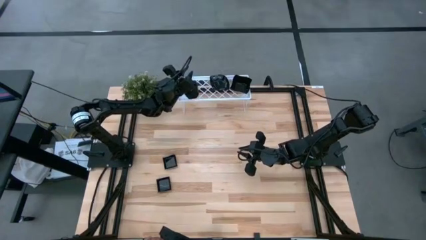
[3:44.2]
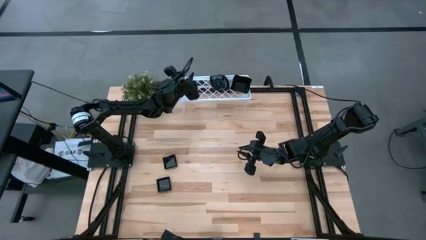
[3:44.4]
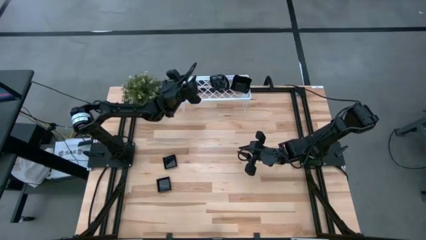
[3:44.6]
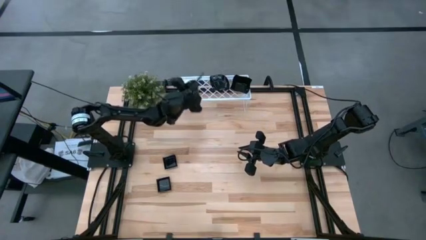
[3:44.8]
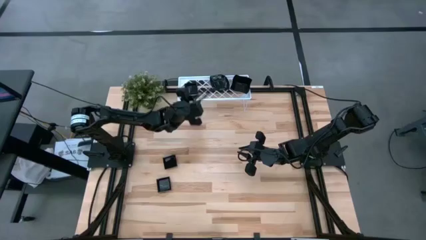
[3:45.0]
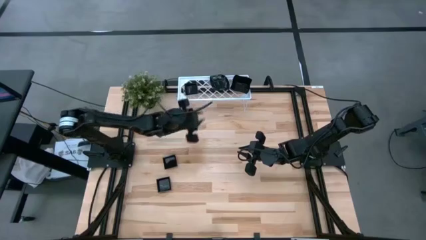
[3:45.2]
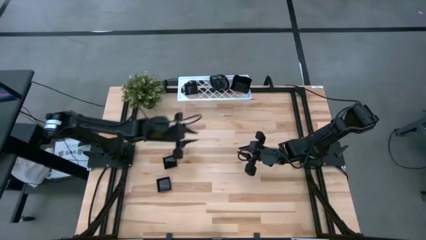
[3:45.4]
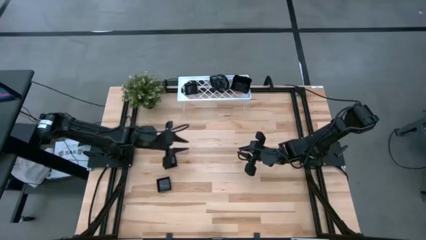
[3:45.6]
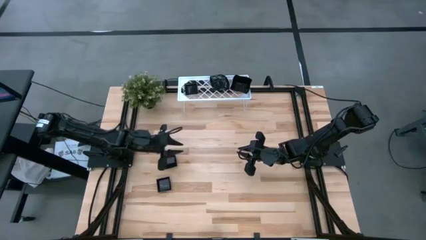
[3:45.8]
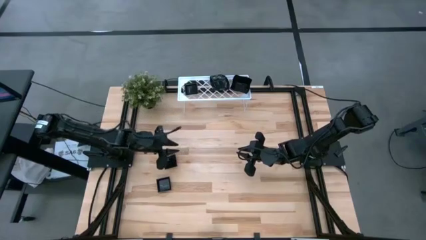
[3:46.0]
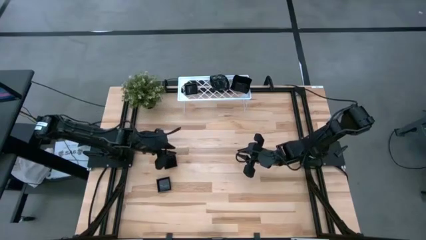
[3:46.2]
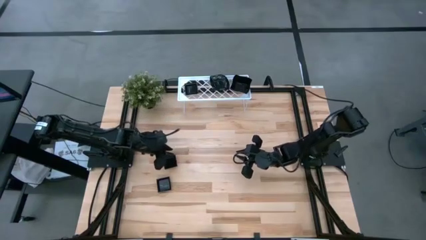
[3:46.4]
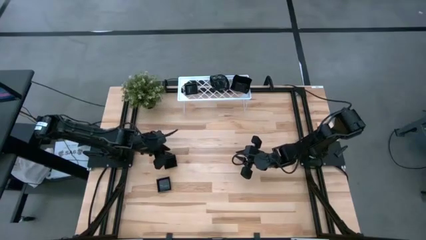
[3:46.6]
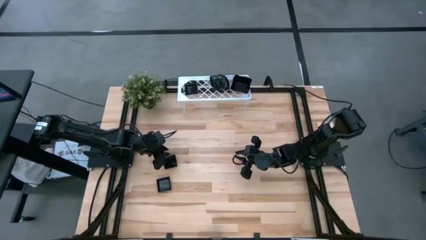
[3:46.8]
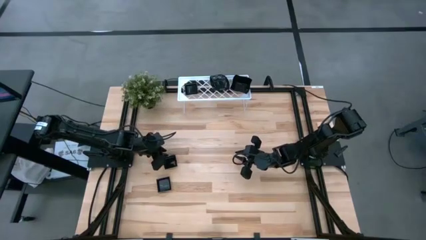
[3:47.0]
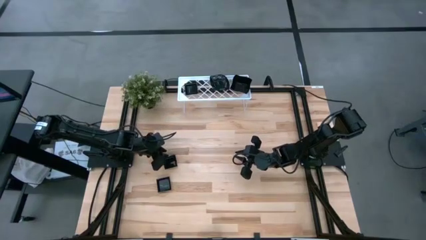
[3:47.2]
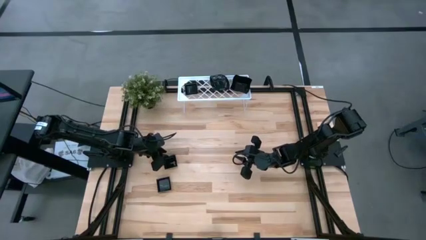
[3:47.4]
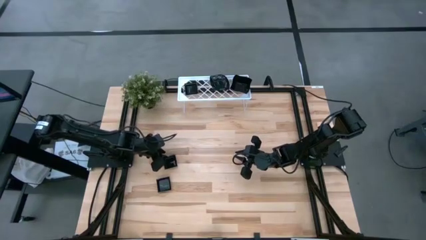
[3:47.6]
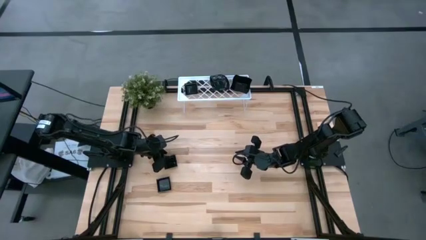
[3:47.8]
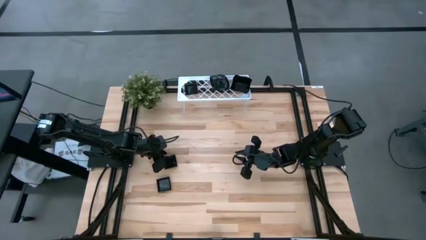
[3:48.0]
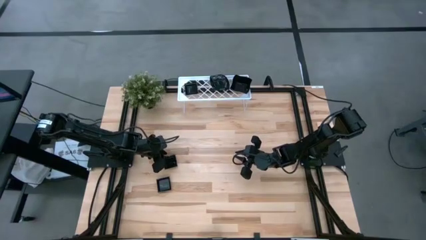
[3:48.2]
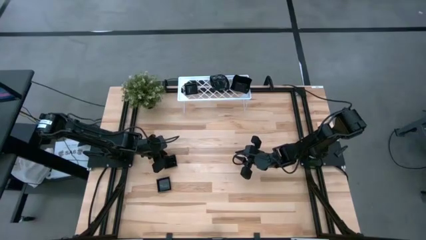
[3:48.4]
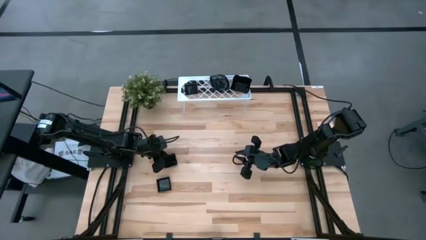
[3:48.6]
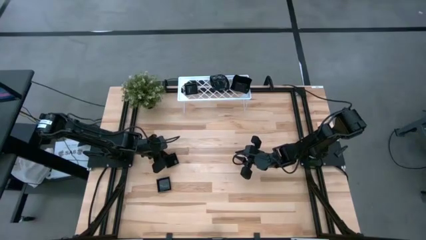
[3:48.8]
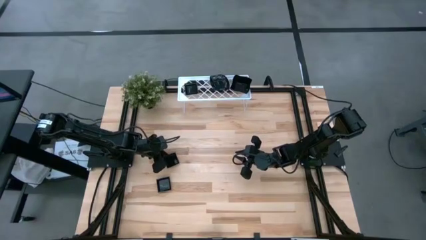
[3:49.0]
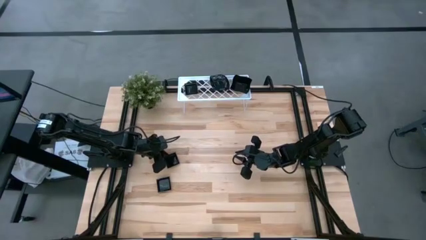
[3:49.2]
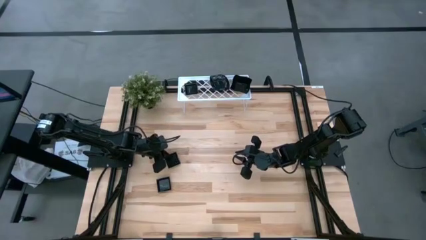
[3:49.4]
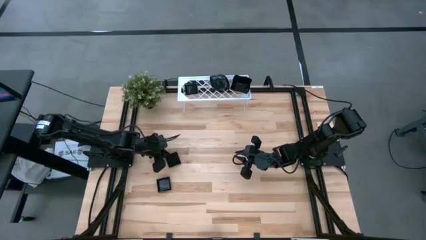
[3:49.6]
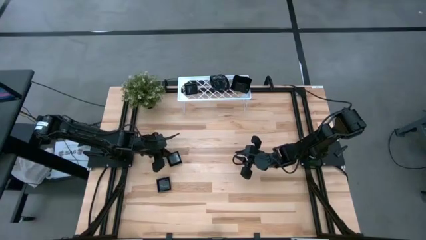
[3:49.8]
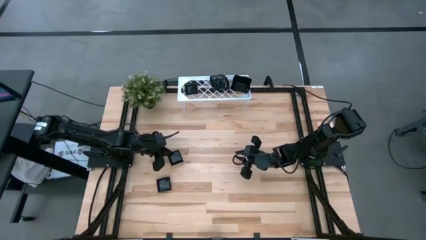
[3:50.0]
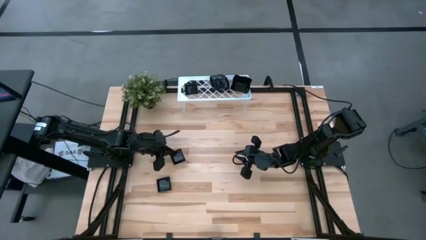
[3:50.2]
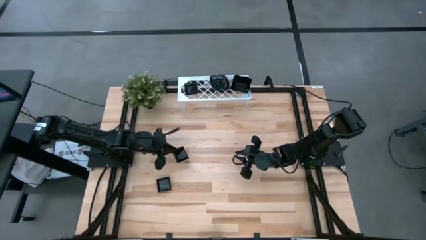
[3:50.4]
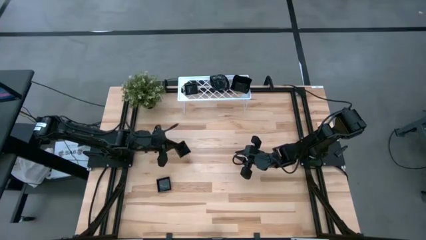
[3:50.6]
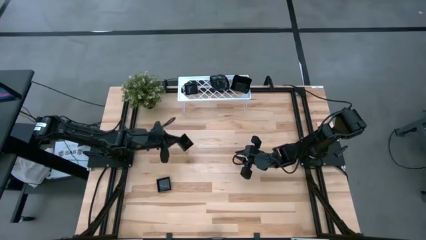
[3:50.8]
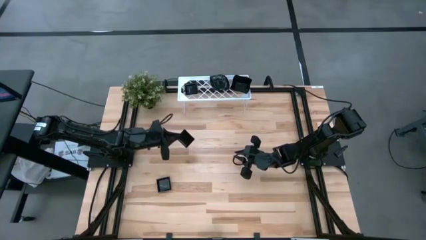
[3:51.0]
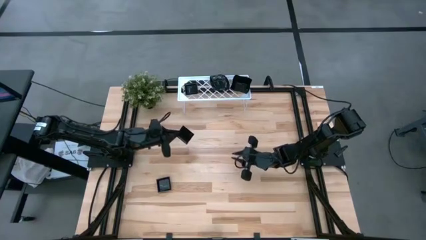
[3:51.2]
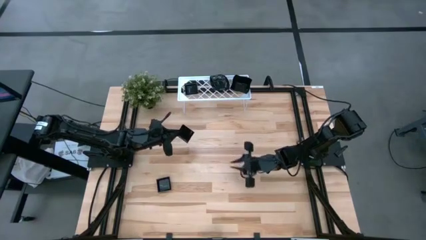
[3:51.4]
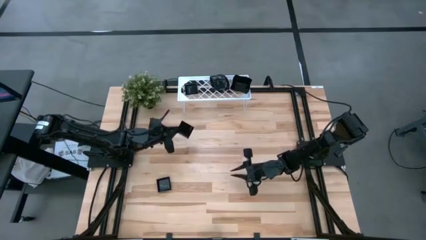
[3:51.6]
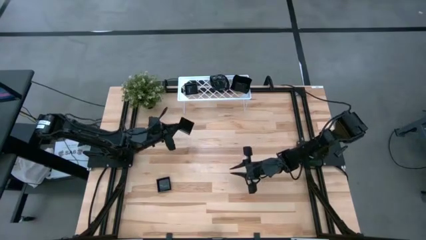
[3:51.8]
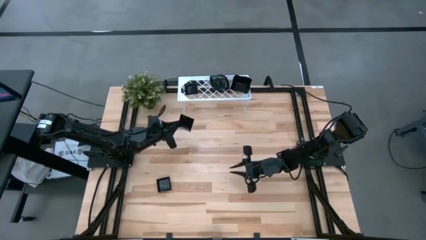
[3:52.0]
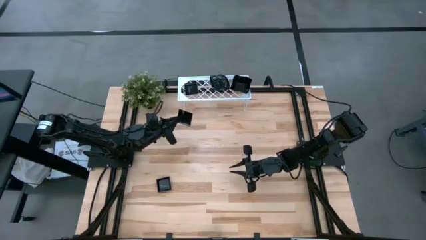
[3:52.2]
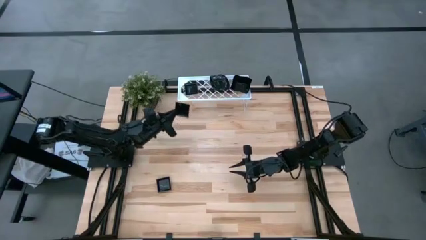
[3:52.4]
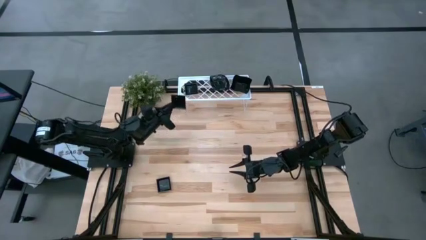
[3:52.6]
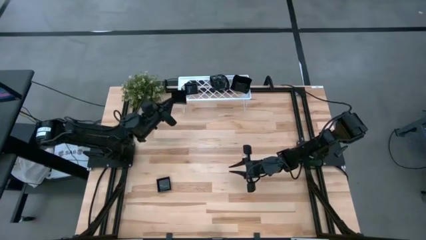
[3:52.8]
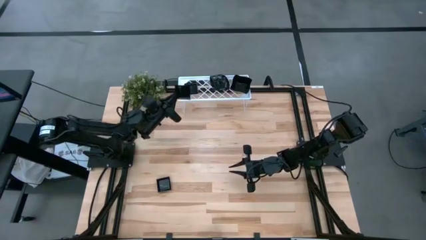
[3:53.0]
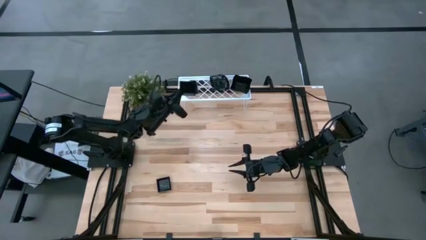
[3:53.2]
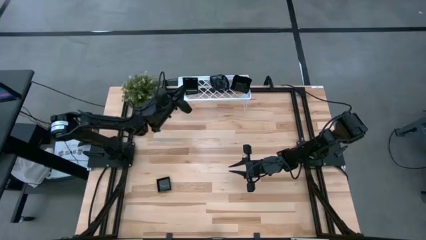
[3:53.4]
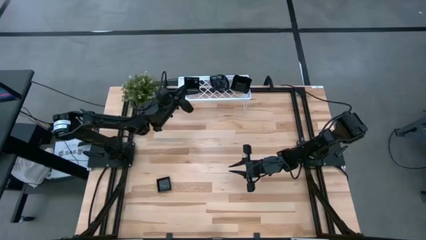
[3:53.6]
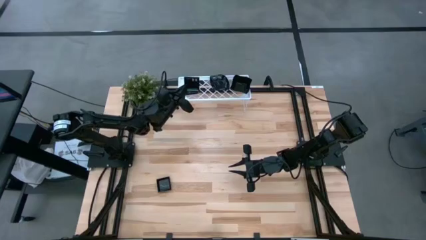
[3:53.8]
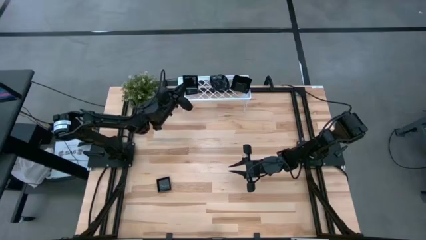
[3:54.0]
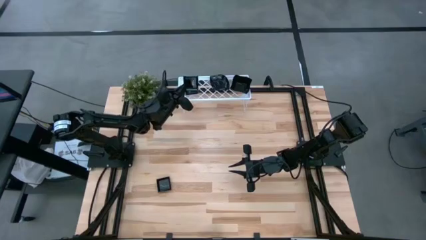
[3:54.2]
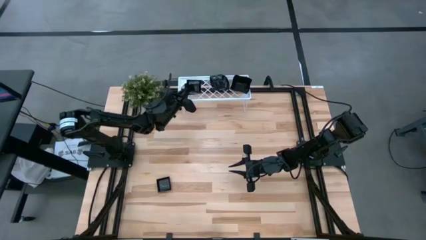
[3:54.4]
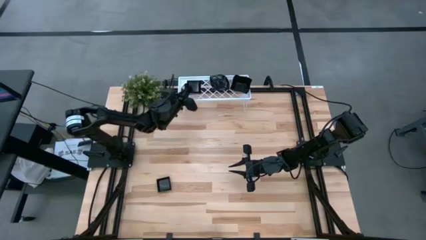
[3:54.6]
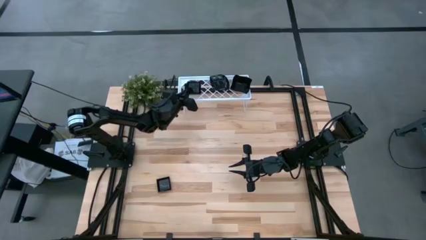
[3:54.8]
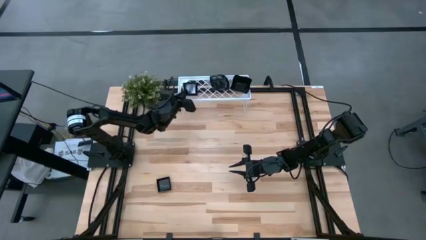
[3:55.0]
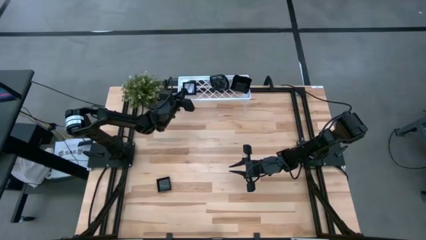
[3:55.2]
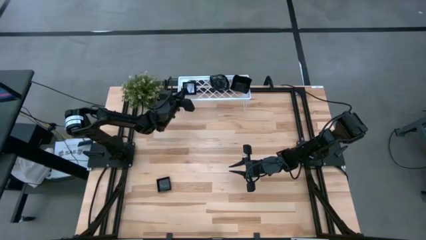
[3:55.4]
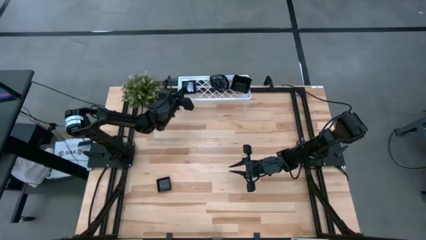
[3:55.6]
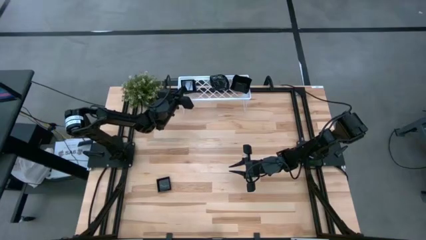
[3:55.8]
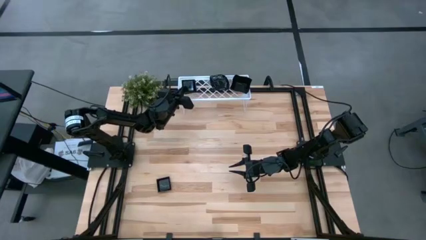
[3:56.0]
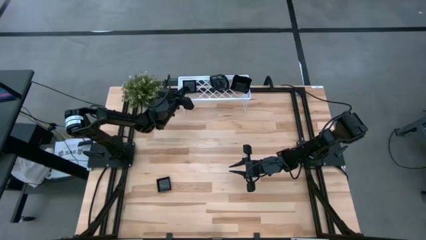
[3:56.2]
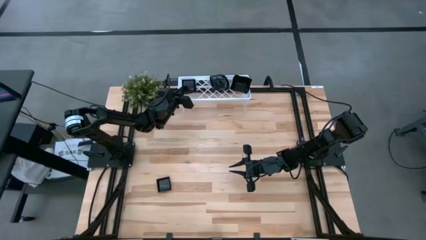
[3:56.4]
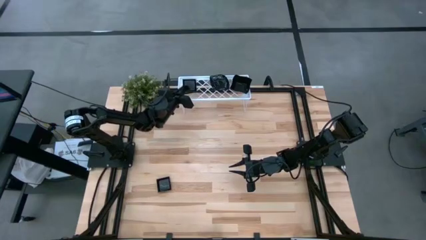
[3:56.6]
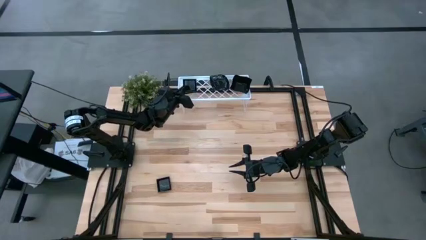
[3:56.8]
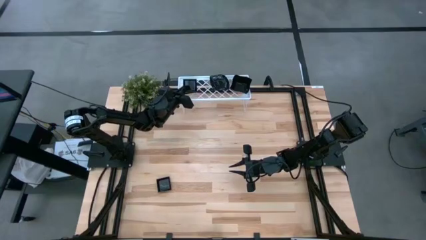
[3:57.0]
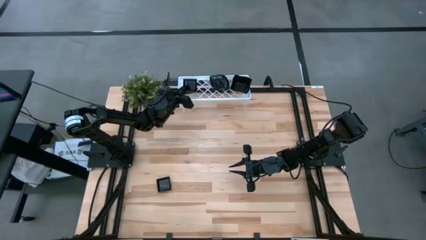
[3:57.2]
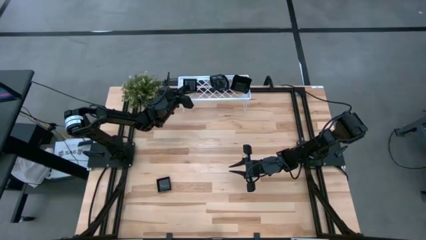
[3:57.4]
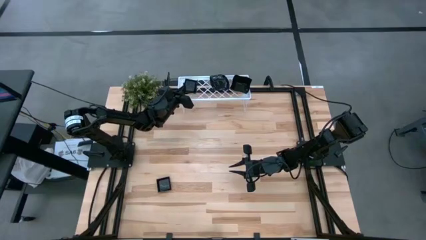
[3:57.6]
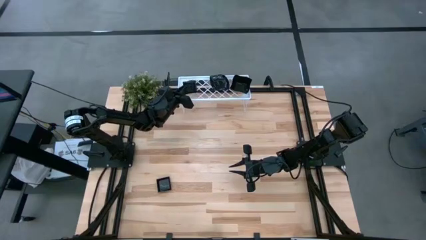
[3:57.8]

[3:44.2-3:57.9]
Task: Pick & Place Mini shaped plates
Stack the black square plate on top of the black square plate on the shelf
